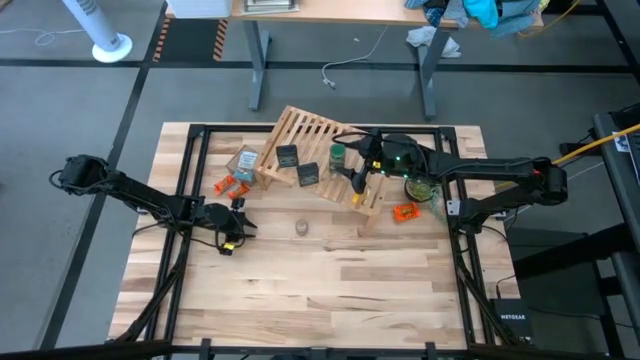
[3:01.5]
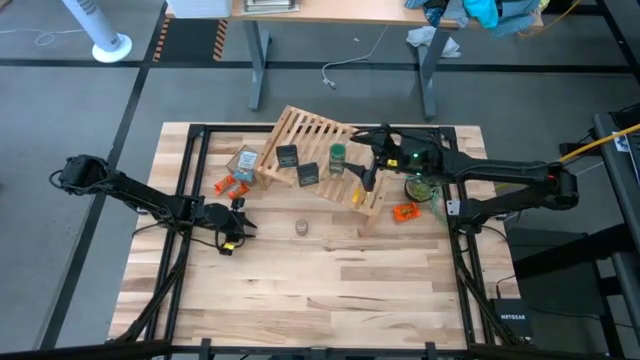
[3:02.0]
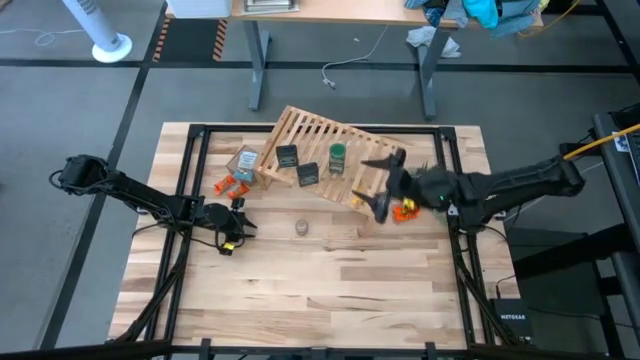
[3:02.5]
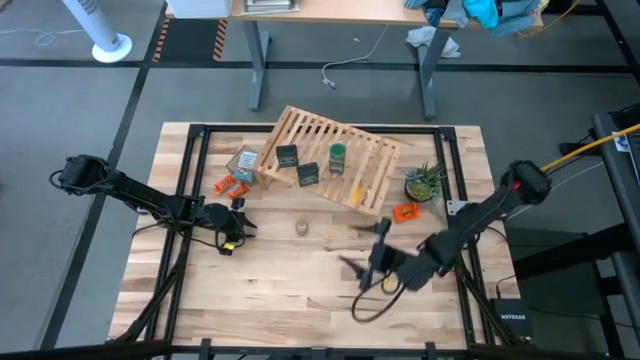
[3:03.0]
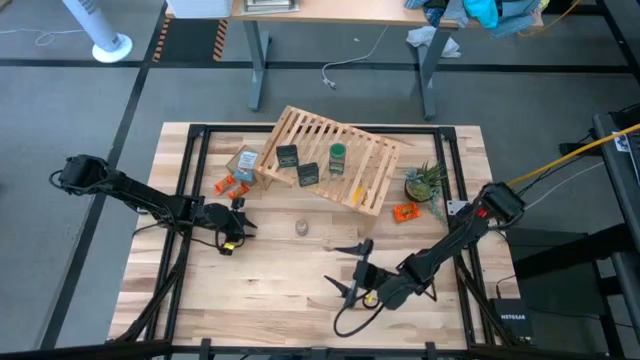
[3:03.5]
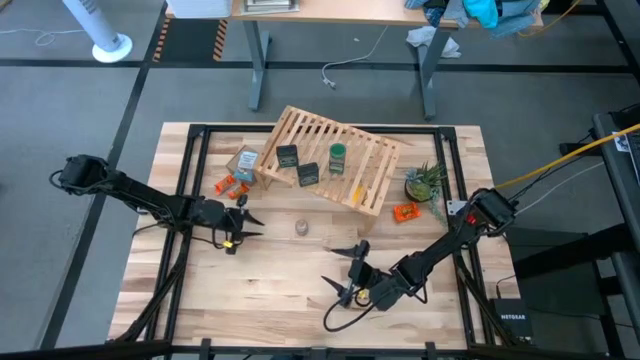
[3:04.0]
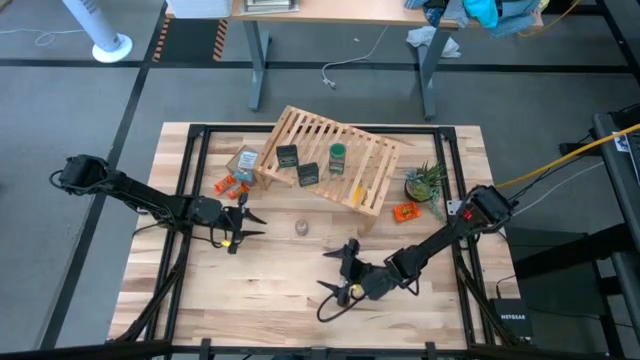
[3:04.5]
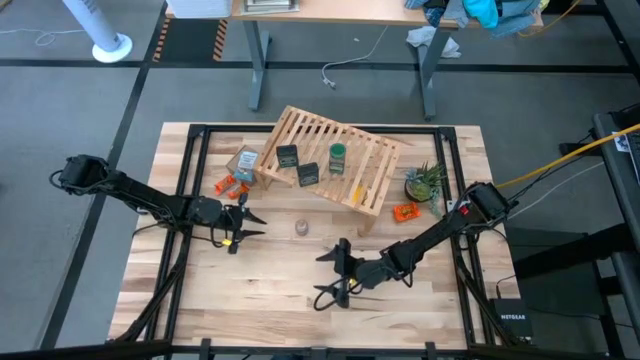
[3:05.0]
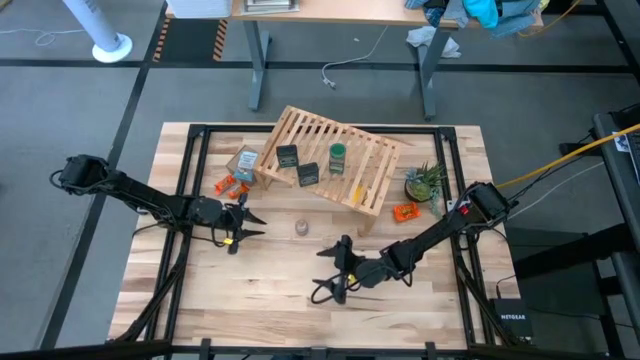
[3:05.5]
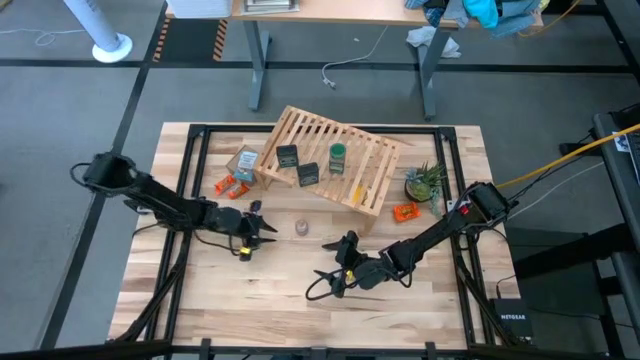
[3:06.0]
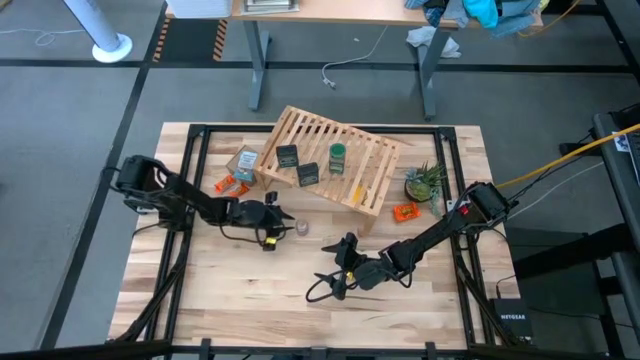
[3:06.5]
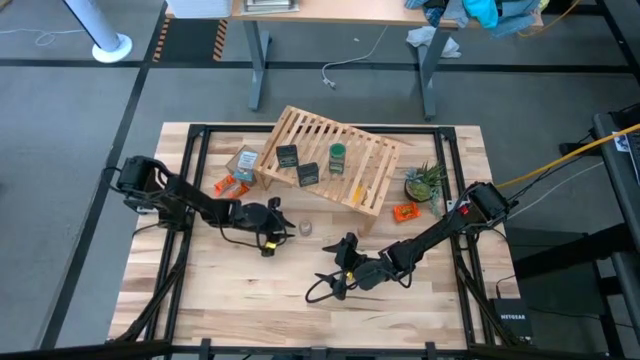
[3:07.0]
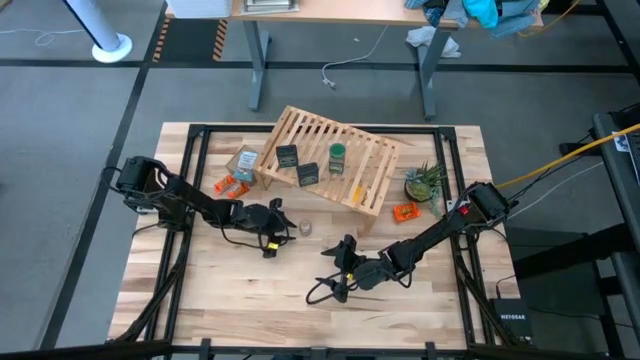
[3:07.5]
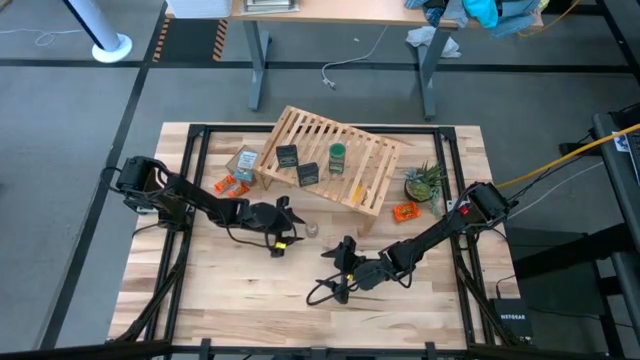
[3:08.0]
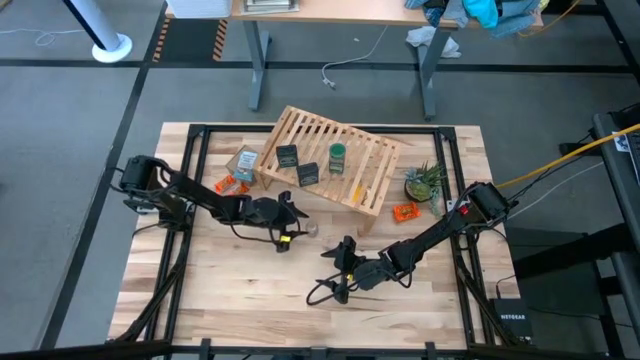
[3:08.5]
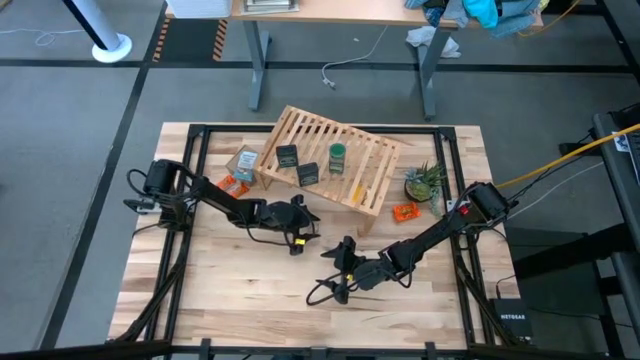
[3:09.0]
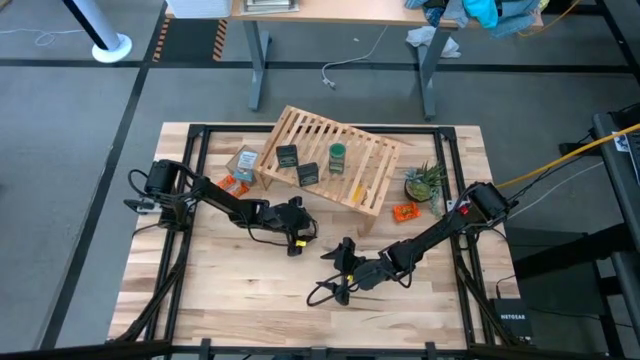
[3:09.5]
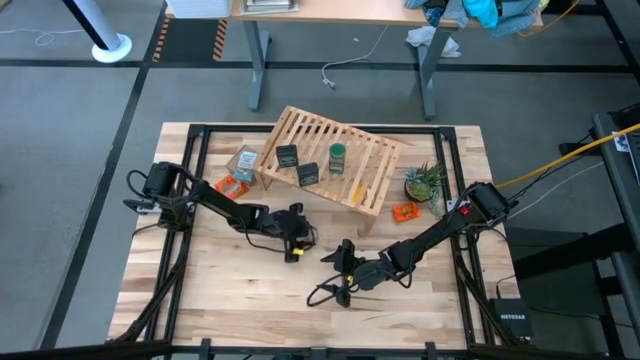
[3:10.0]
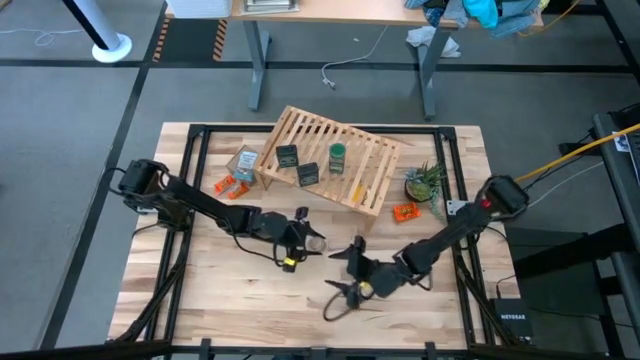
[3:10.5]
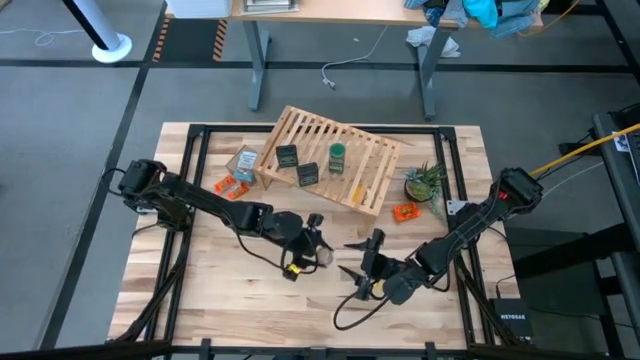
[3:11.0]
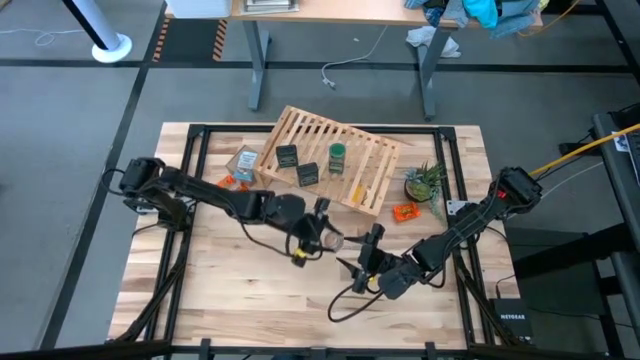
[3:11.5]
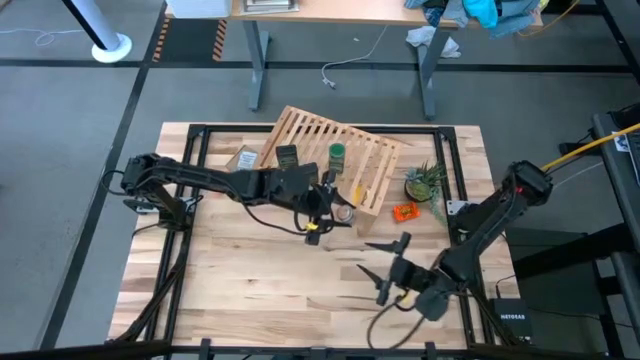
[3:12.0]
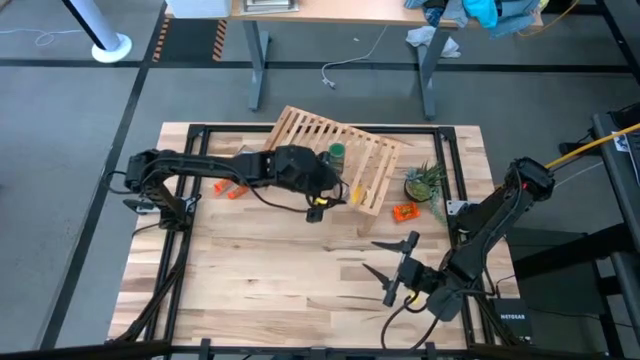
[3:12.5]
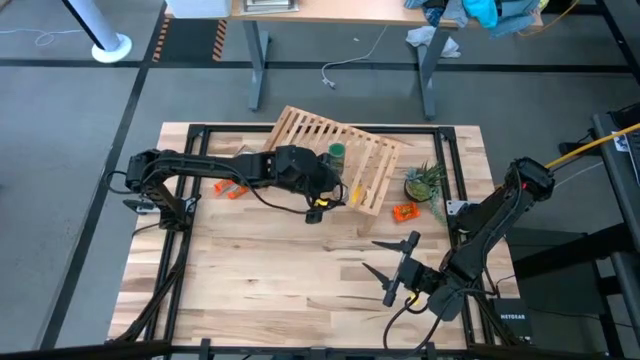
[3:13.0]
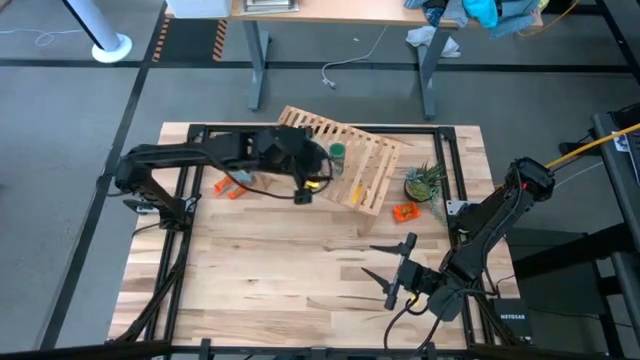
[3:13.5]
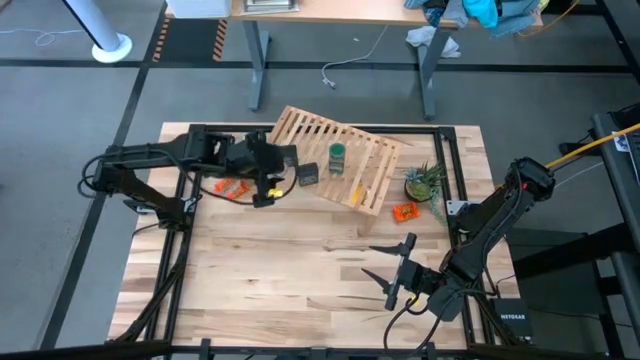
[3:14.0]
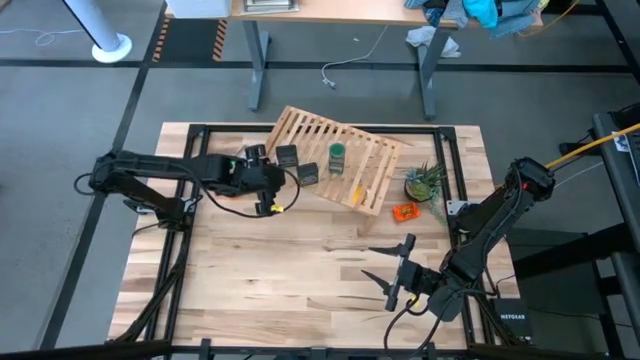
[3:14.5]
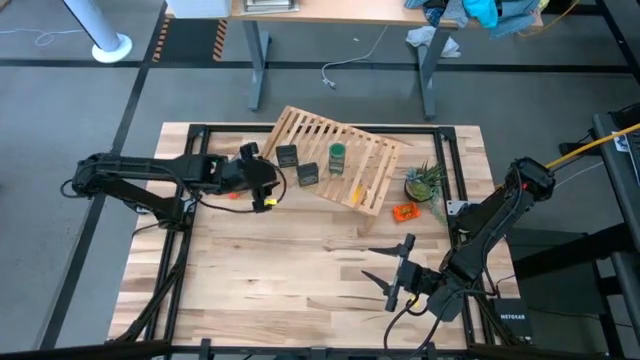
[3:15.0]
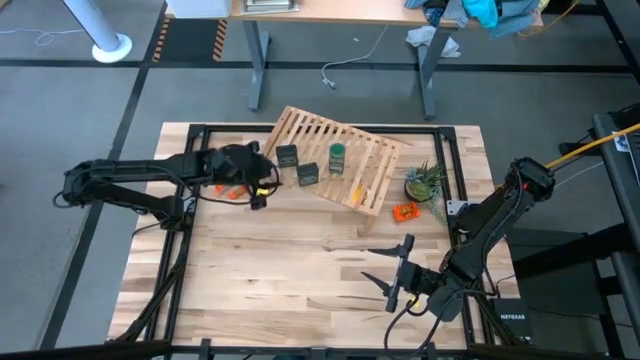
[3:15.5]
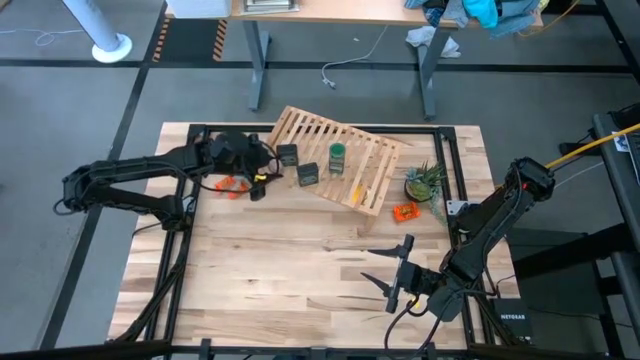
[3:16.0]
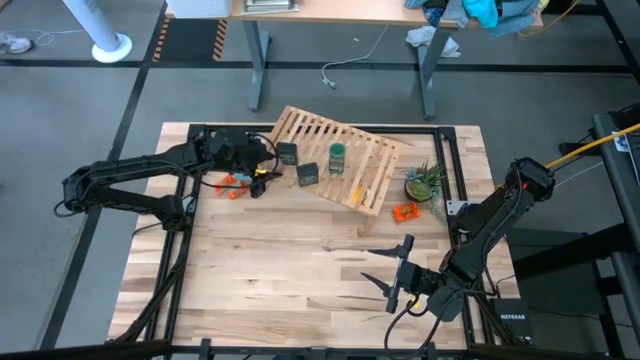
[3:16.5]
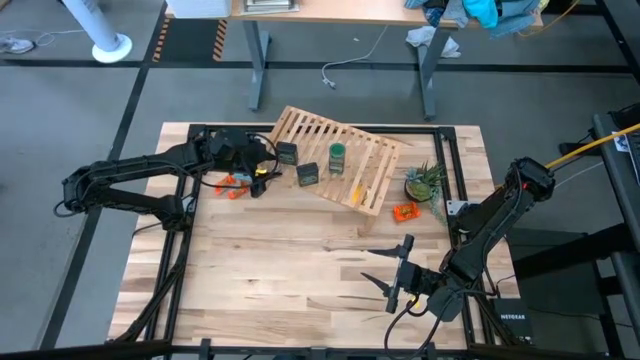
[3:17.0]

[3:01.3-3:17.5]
Task: Shelf spices
Put the transparent seasoning bottle on the shelf

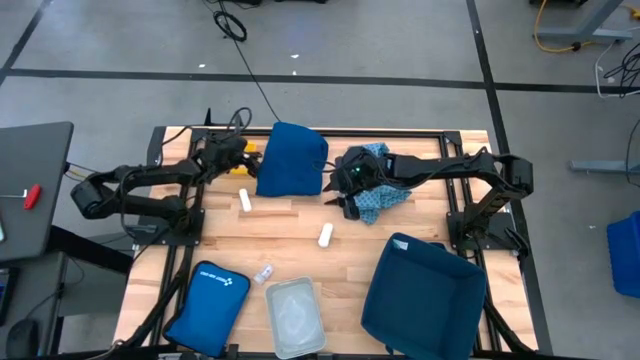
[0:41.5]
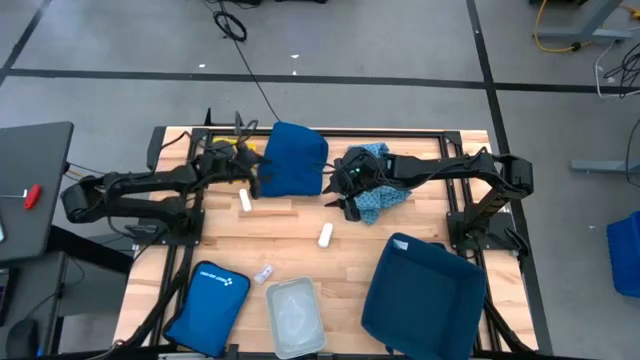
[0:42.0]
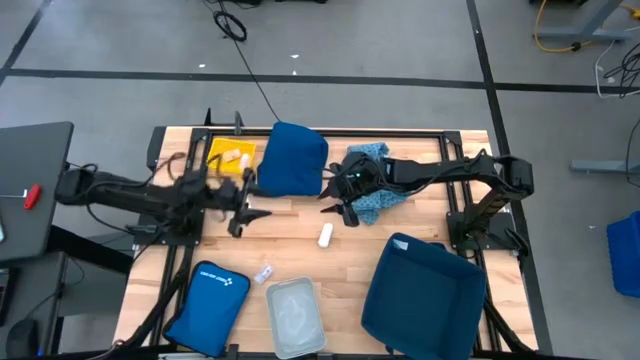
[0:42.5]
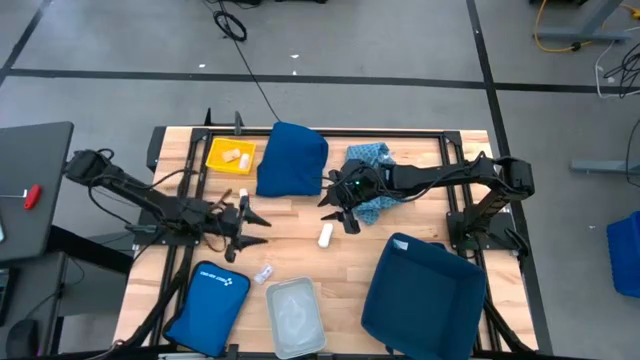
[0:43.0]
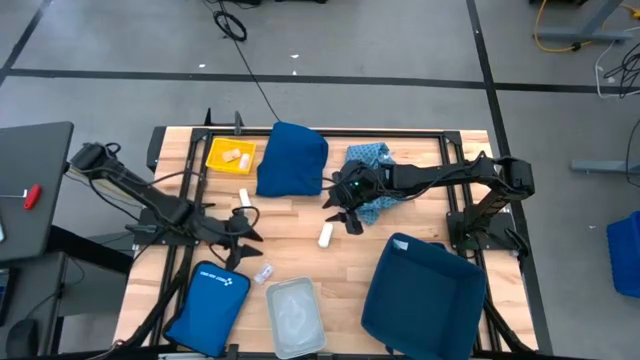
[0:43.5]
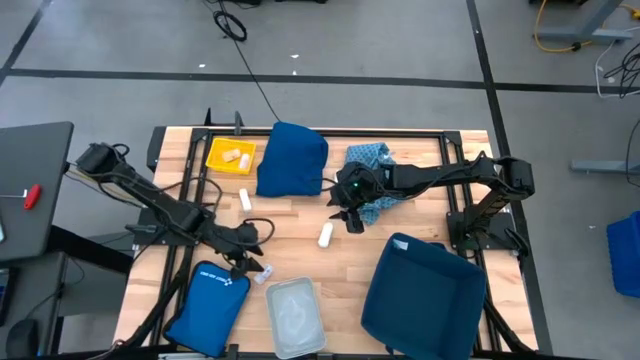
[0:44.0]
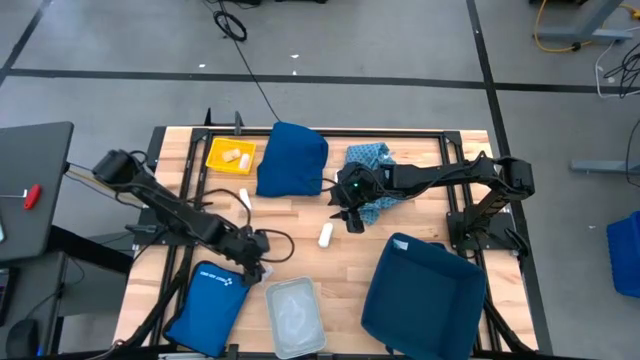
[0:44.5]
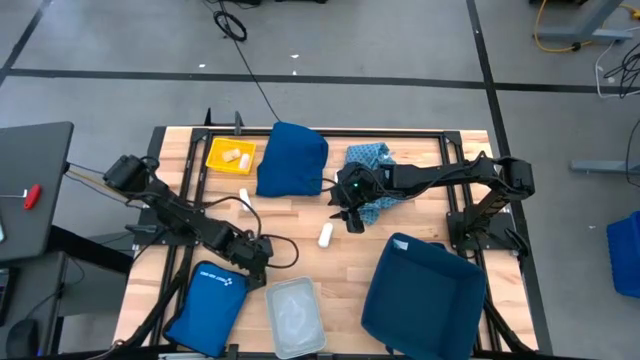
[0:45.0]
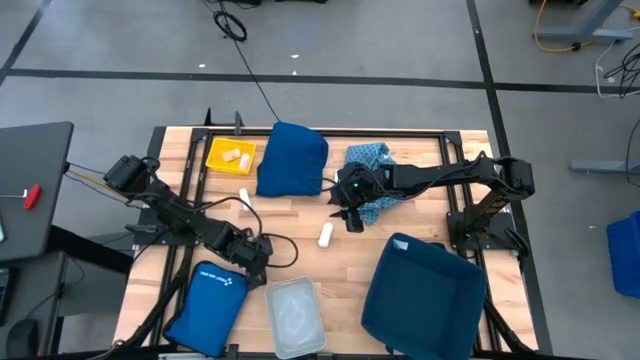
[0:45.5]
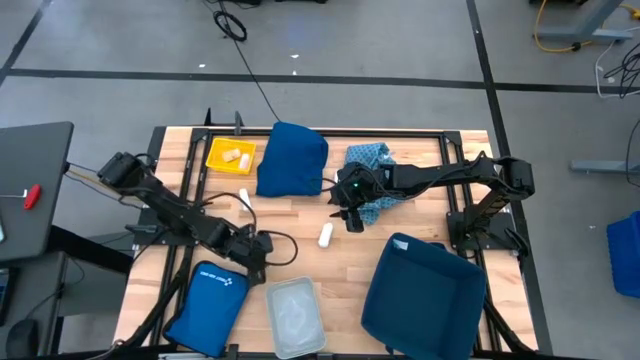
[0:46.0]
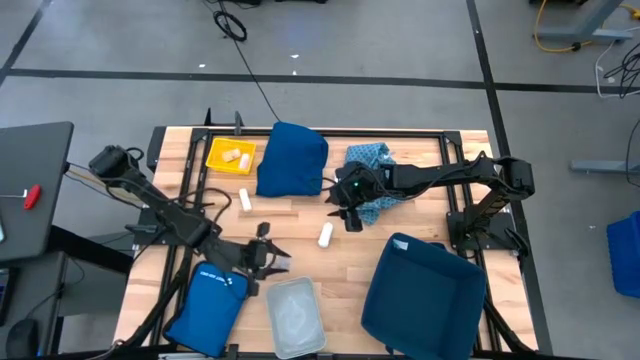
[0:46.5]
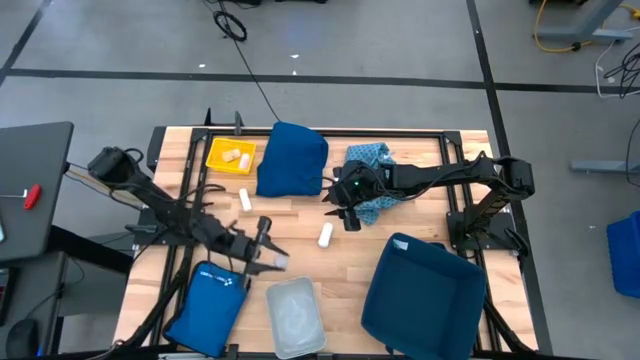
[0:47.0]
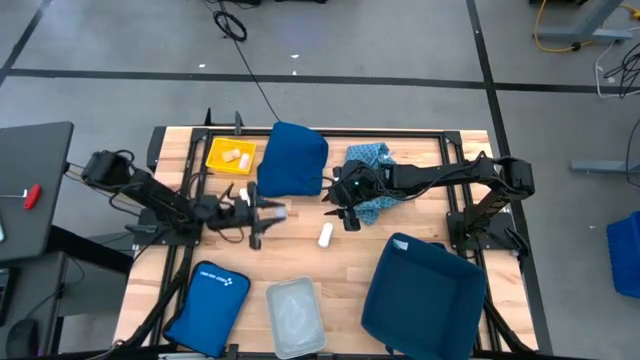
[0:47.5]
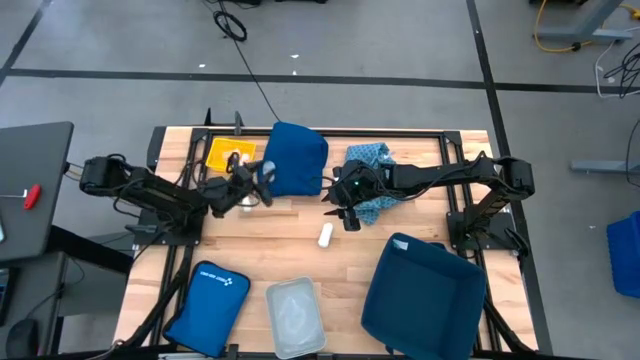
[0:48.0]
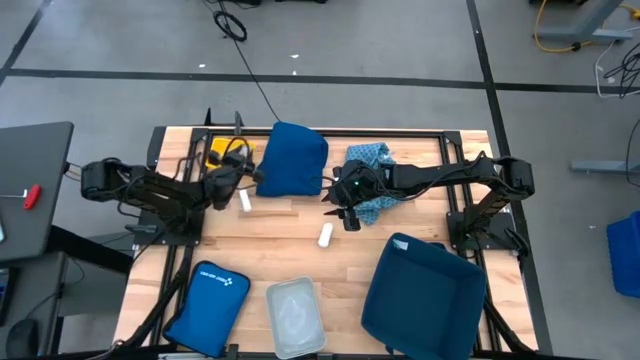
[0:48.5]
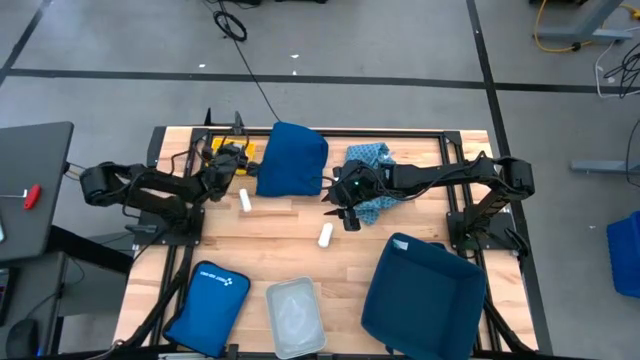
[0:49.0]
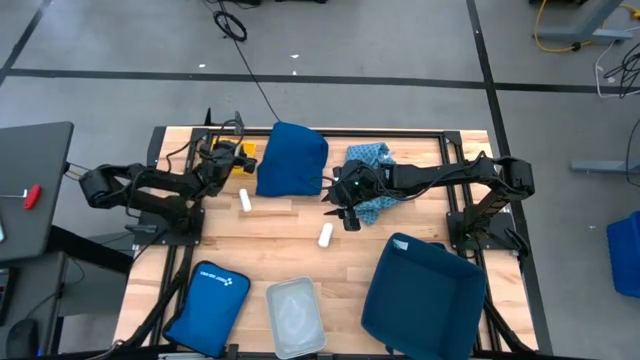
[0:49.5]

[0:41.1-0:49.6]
Task: Pick & place medical supplies in basket/bin
Put the white pill bottle into the yellow bin
